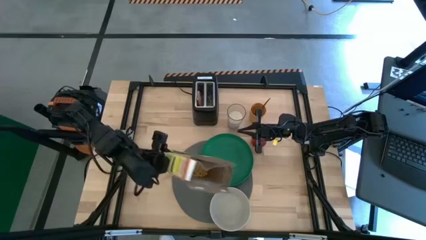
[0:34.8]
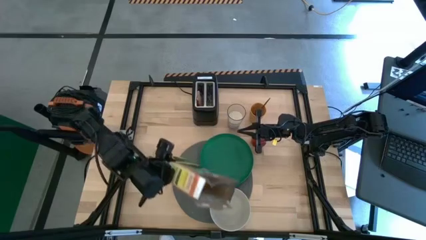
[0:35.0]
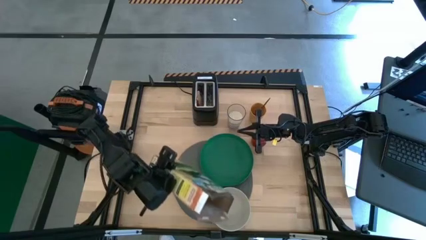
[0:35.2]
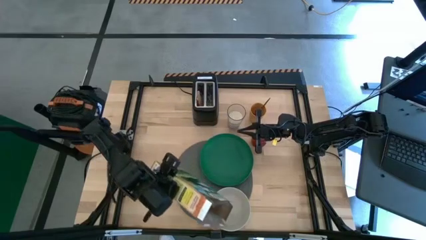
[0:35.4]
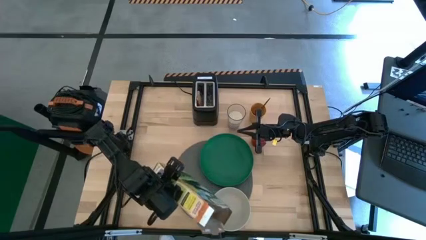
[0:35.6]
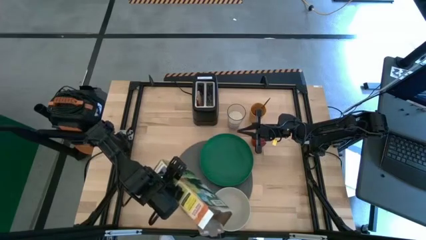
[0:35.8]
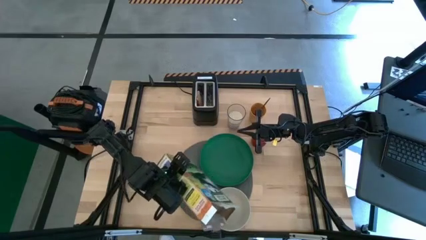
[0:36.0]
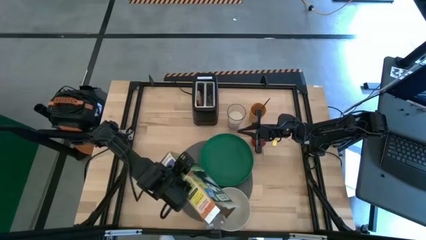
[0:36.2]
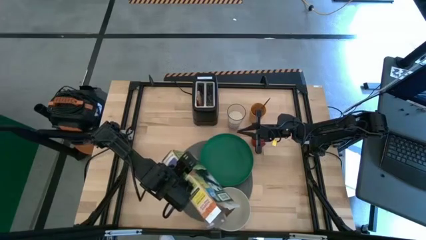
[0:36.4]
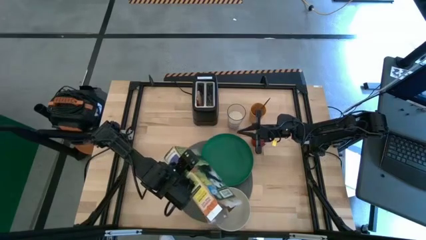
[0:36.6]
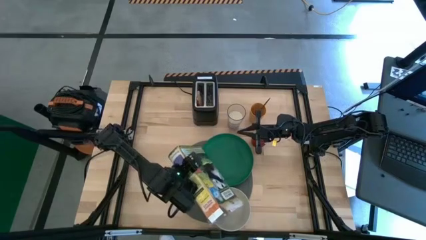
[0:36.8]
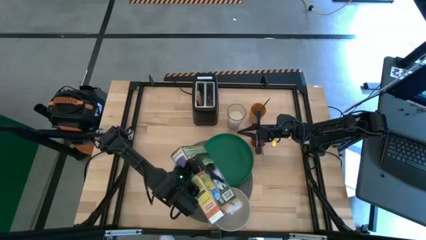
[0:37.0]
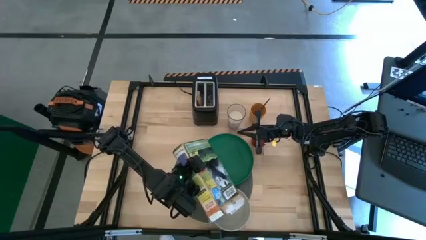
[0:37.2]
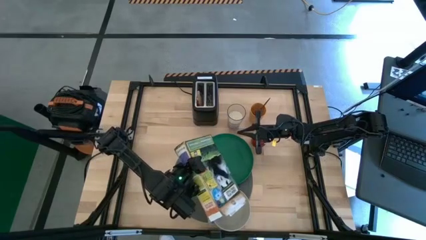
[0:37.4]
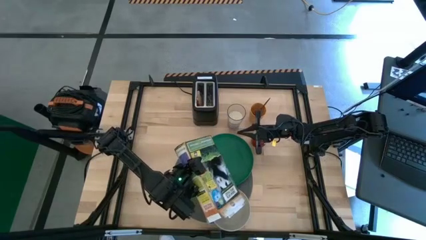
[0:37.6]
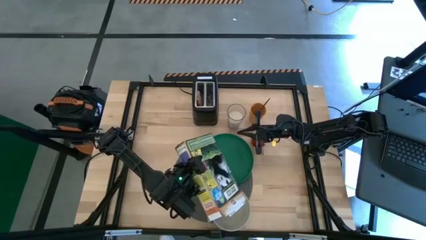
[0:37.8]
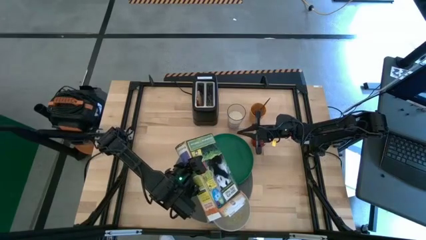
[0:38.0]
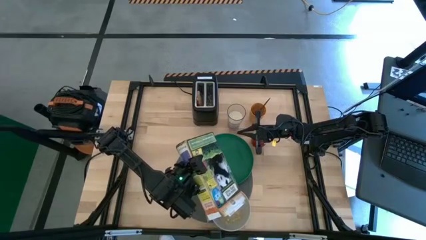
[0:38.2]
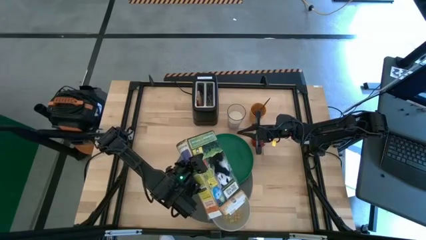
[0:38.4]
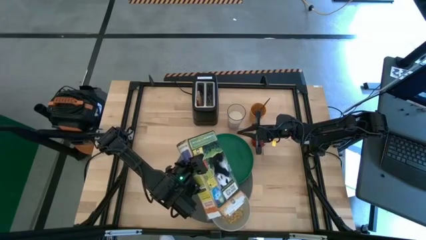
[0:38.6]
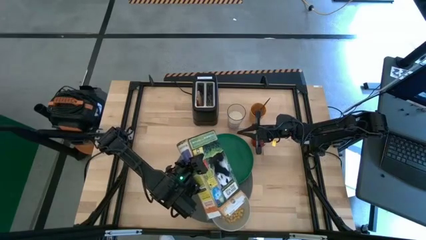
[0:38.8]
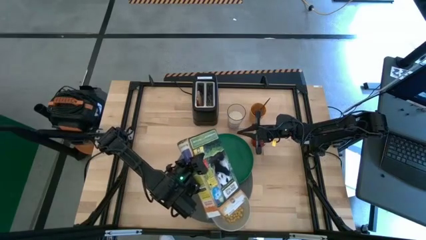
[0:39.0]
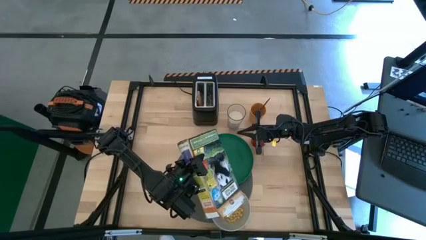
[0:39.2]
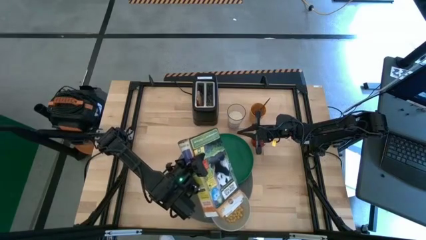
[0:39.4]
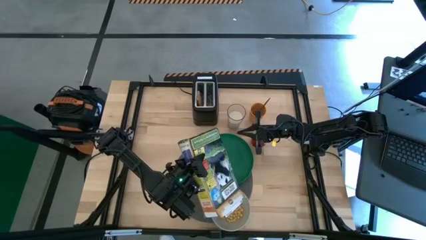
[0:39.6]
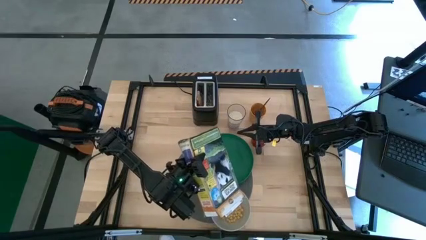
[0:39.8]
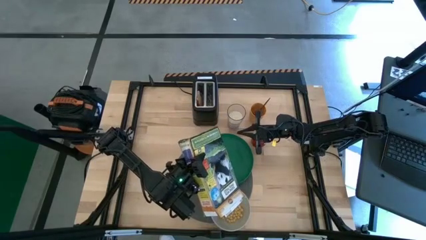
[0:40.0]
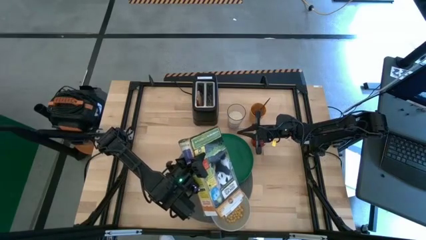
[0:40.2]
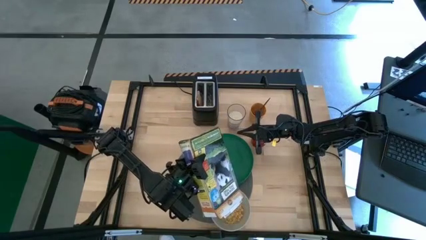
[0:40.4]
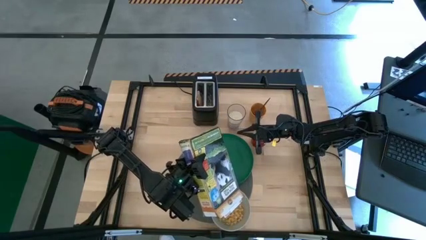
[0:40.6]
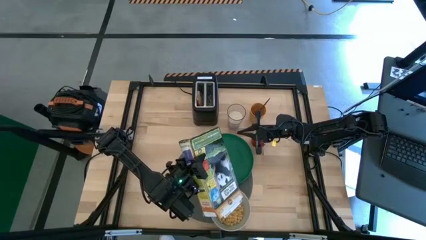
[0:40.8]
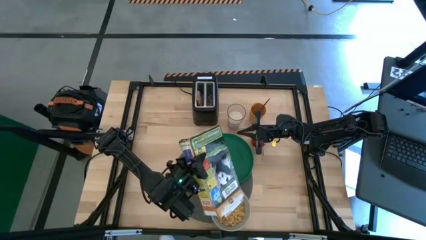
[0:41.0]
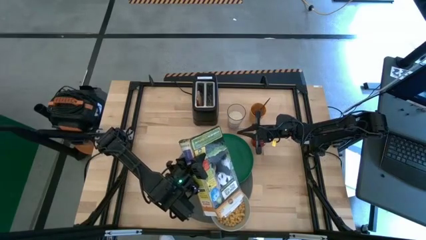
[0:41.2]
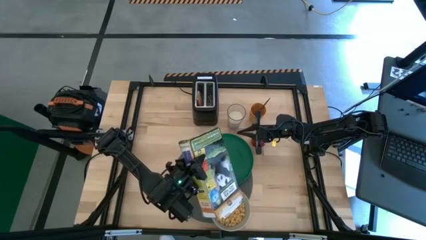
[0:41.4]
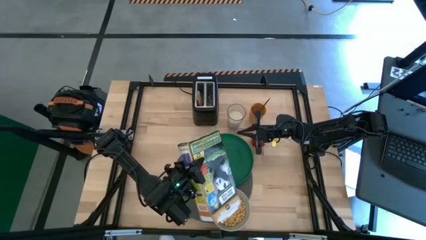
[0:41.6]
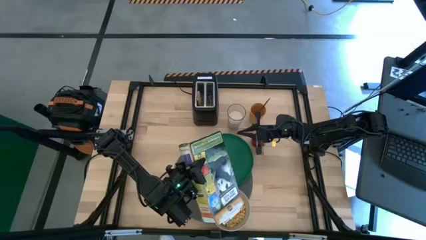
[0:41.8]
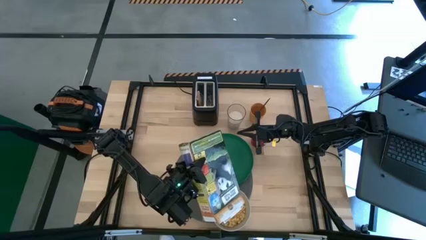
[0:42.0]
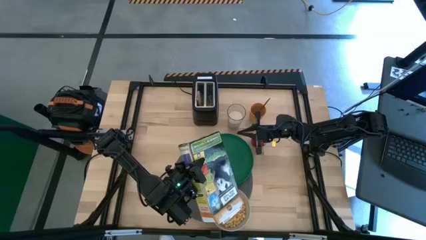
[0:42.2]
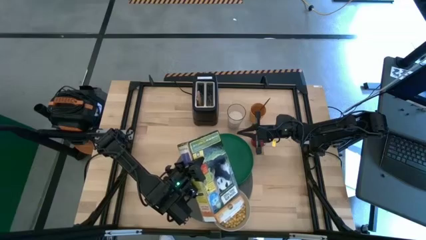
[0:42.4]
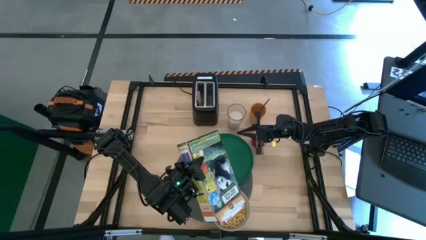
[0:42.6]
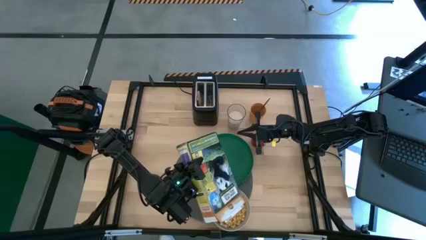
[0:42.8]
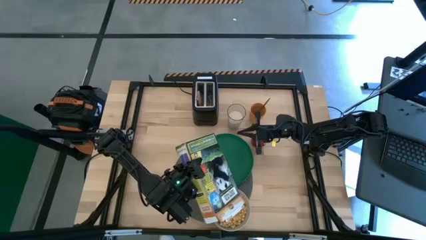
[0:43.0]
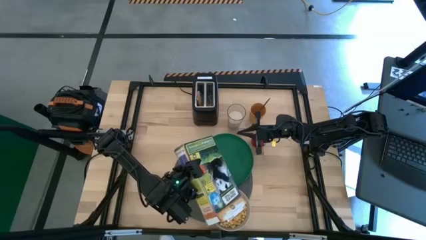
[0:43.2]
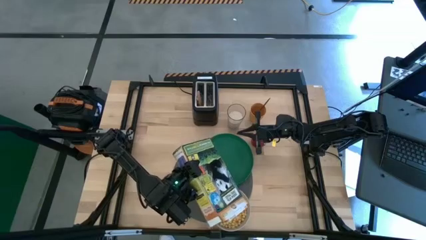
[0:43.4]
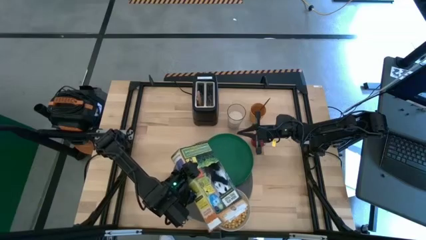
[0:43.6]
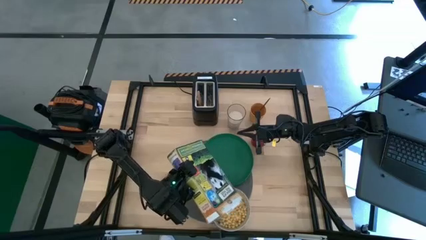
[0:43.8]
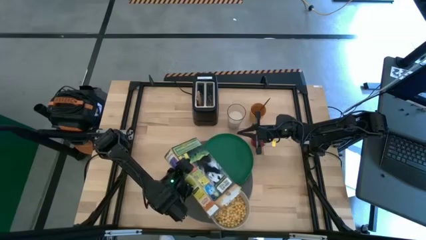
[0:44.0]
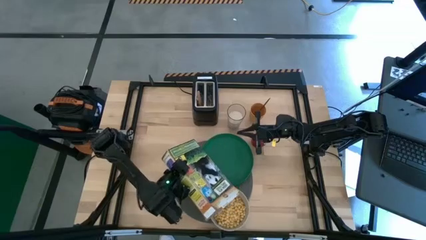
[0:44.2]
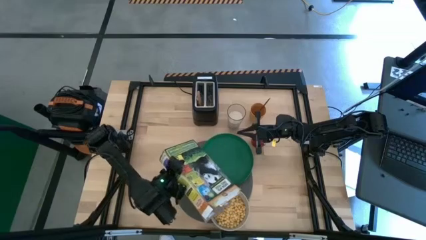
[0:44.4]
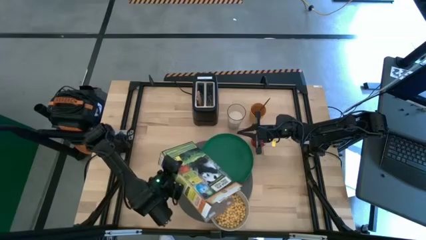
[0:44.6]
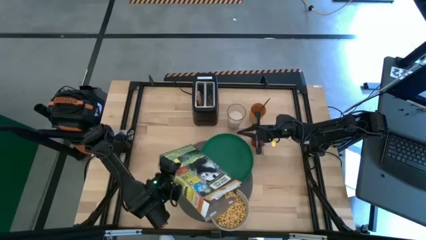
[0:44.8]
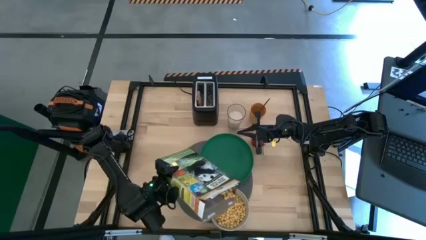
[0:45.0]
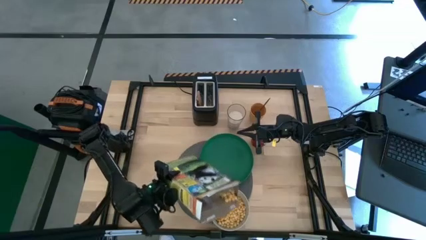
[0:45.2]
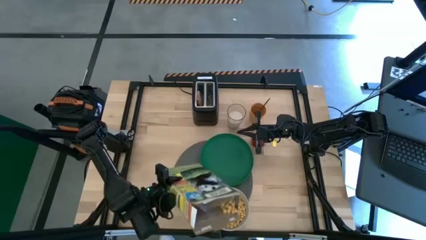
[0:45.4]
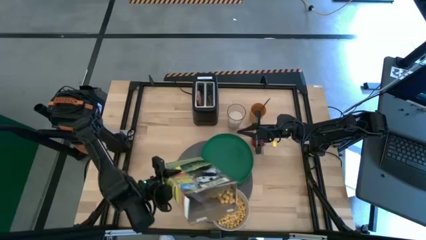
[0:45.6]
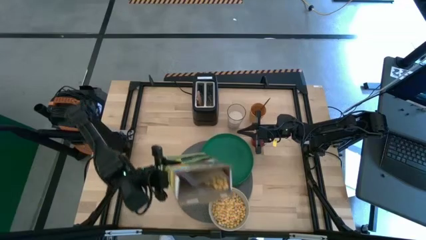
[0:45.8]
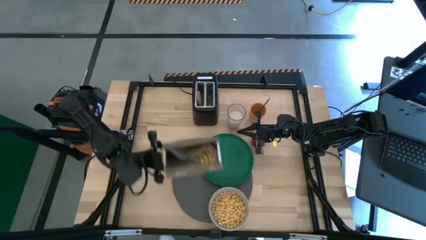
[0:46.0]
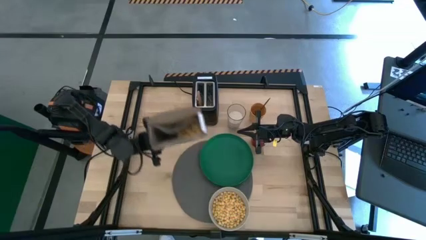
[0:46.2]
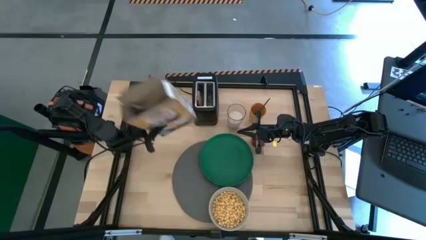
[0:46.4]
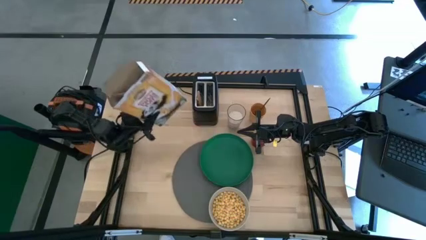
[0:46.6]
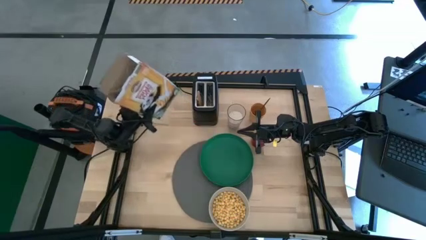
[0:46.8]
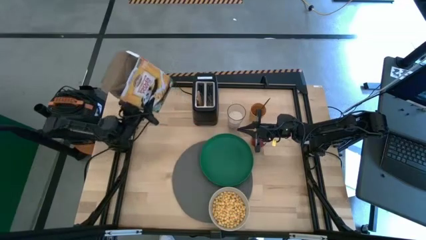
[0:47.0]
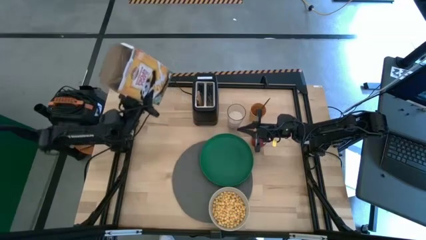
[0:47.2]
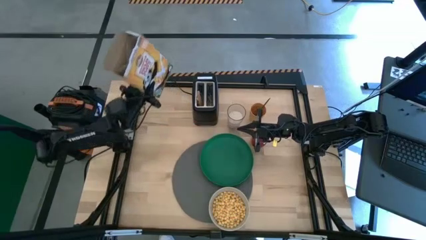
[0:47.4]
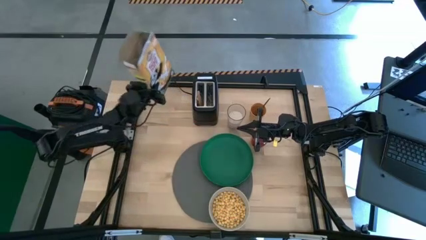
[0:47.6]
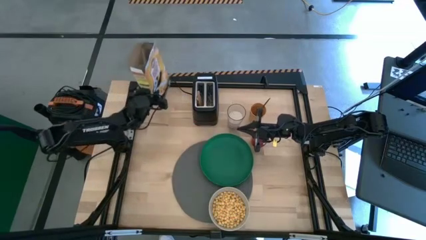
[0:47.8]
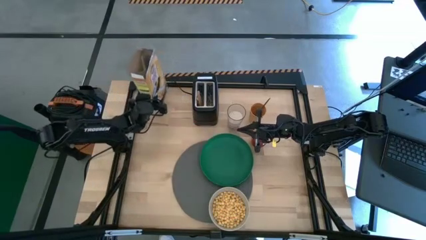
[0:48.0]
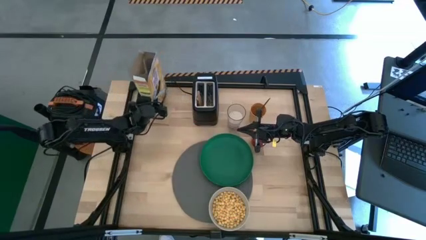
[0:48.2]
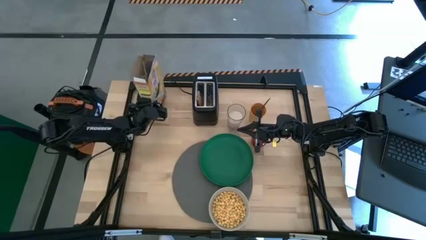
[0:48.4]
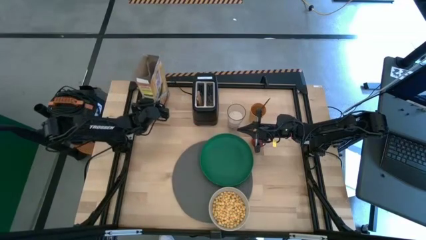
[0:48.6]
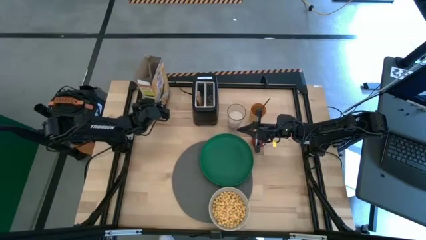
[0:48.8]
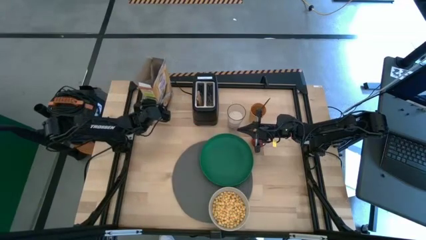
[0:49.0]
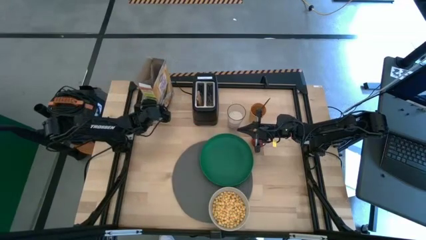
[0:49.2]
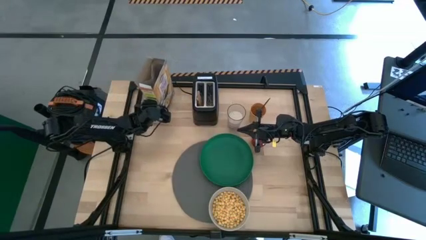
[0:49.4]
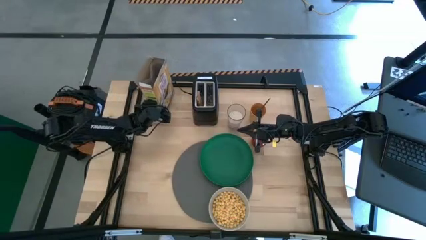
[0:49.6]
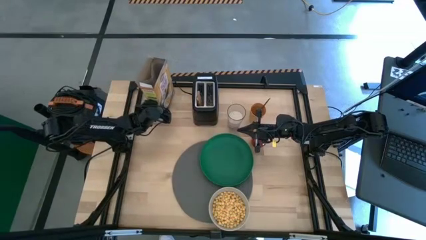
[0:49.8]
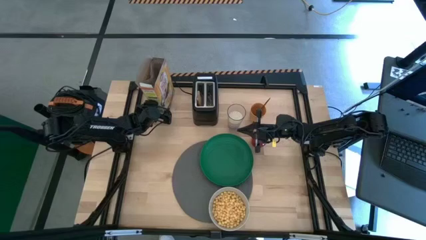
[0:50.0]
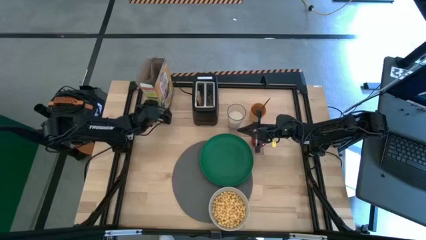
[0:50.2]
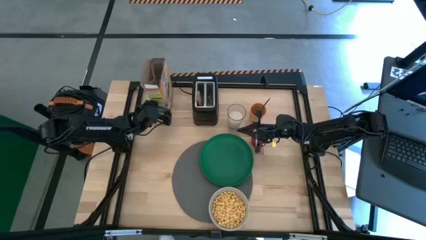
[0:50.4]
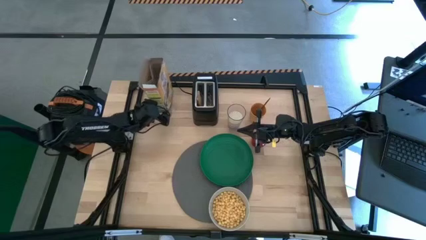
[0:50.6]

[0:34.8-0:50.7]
Task: Arrange a breakfast setting
Pour the cereal into the white bowl
